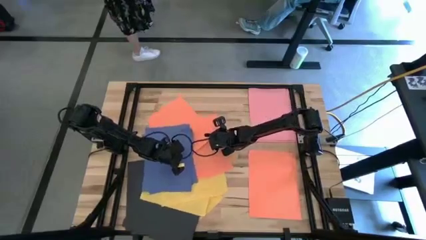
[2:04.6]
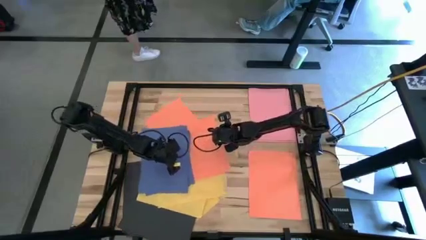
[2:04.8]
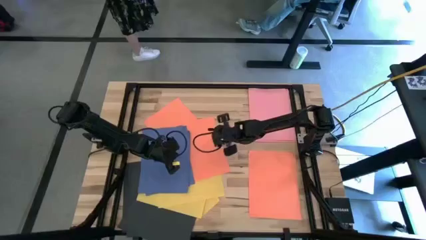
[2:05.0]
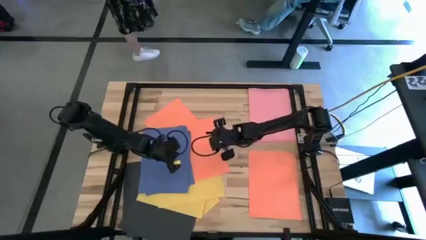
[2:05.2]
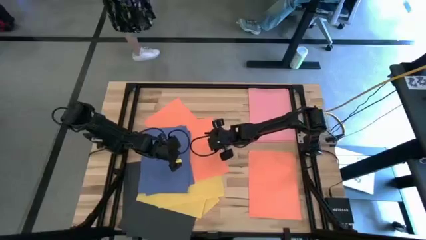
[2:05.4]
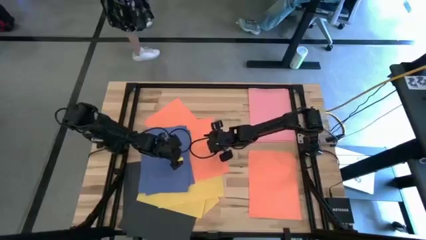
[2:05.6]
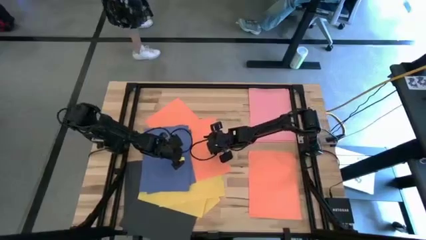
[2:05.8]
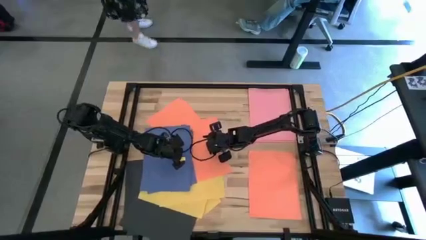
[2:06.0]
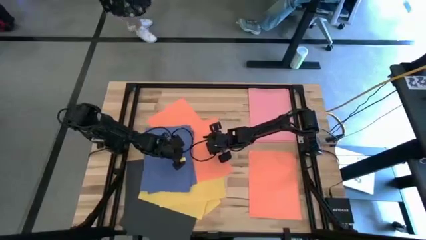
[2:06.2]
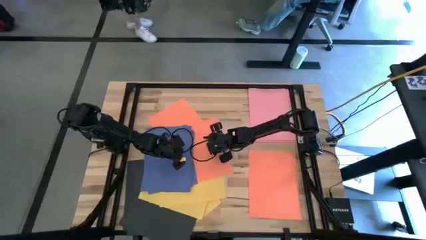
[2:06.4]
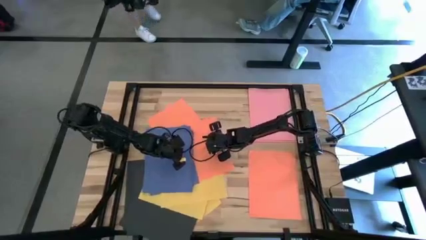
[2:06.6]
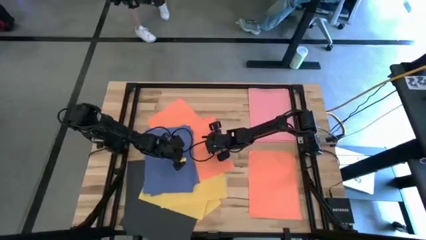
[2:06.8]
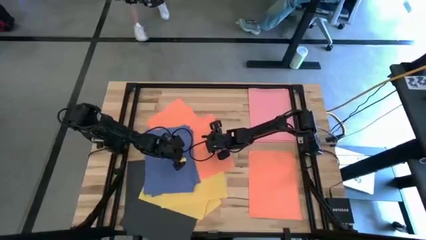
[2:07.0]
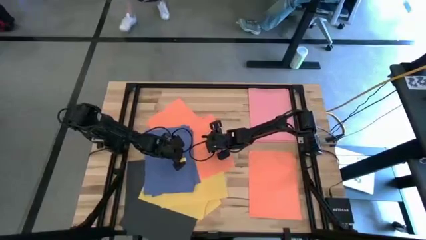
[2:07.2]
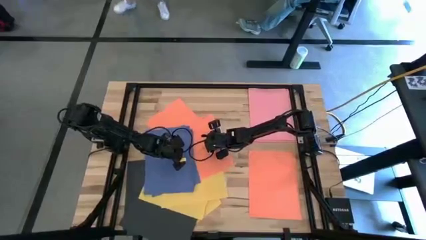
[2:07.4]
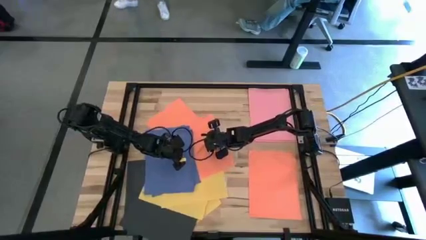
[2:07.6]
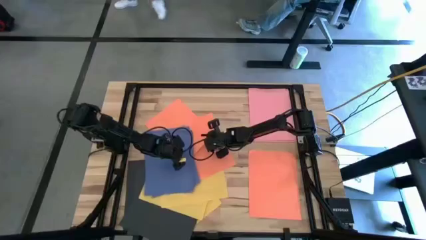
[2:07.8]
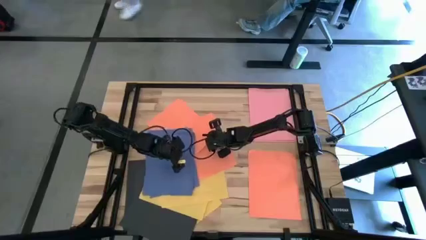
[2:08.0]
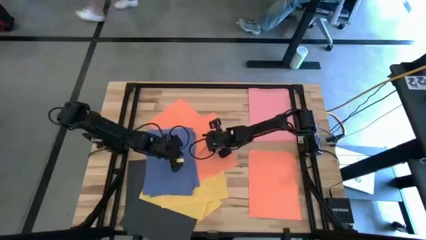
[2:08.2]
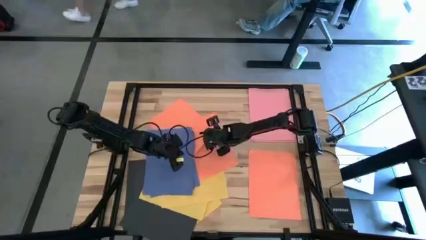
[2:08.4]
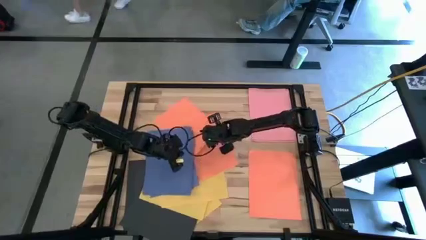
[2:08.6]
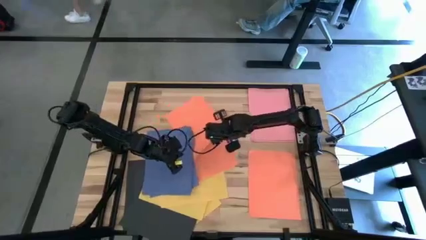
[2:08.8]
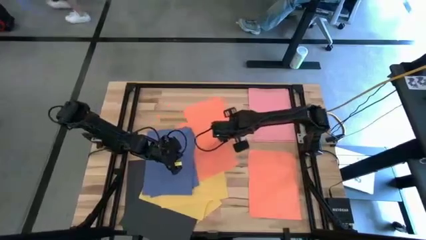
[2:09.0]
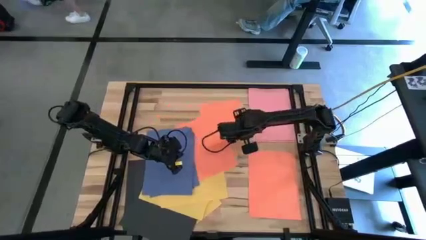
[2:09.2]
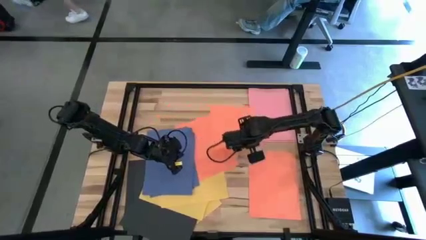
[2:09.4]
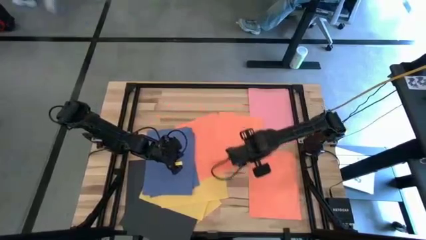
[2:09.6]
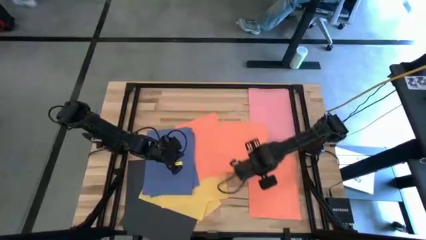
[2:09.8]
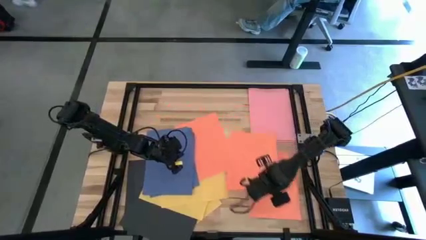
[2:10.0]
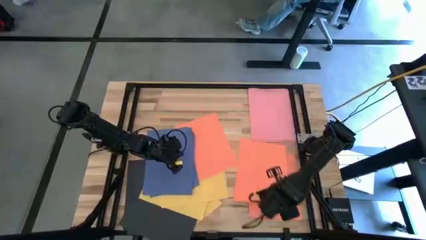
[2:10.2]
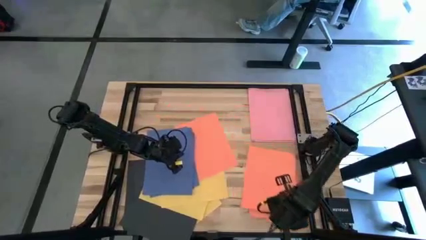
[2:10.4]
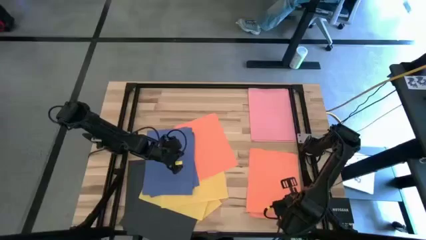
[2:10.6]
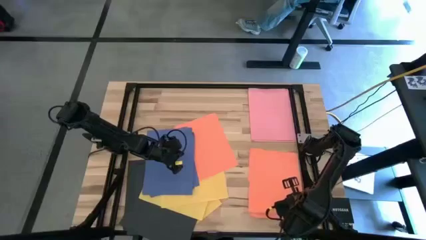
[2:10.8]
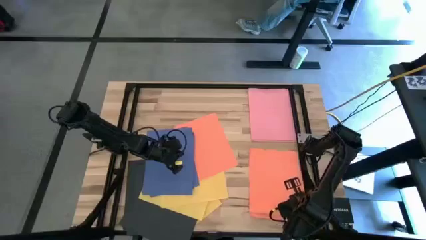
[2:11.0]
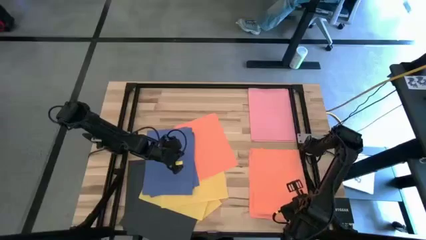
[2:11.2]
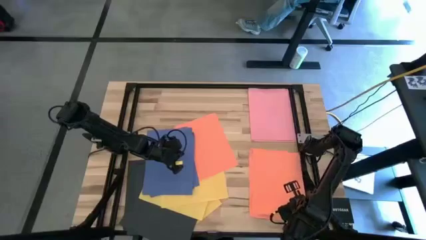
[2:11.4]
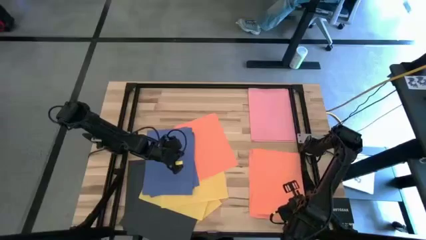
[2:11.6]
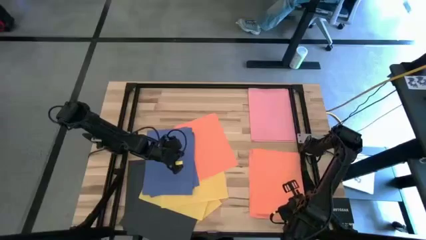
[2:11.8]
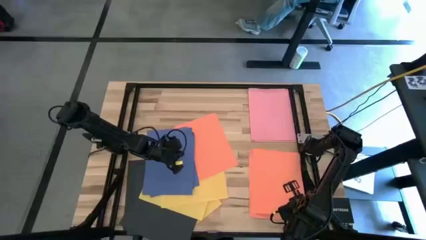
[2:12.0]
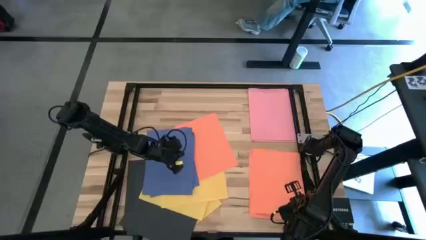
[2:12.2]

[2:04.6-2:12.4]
Task: Organize paper
Stack the orange paper on top of the orange paper

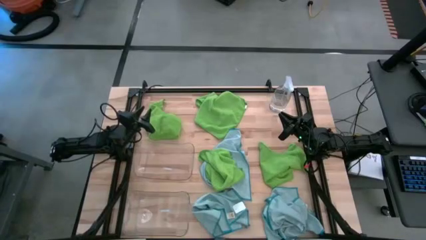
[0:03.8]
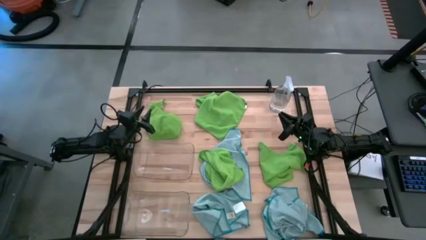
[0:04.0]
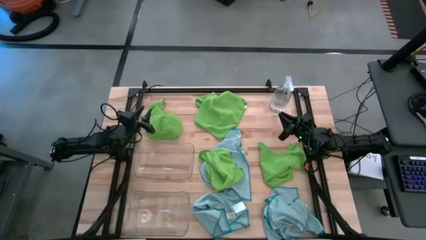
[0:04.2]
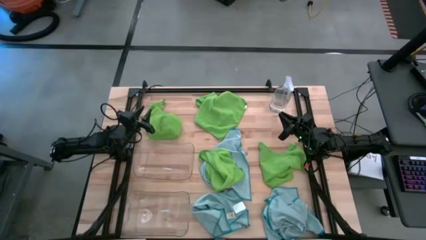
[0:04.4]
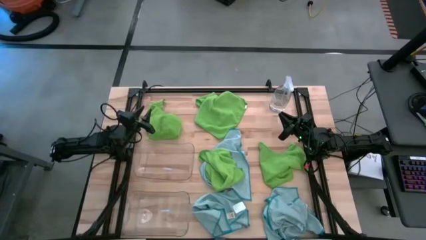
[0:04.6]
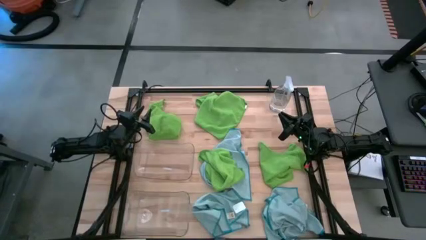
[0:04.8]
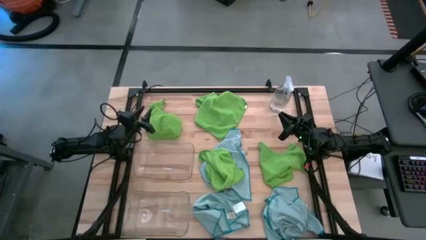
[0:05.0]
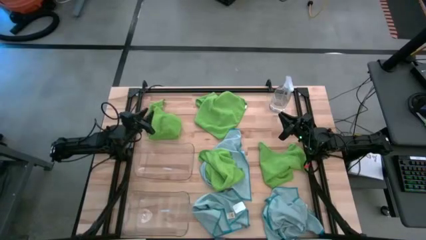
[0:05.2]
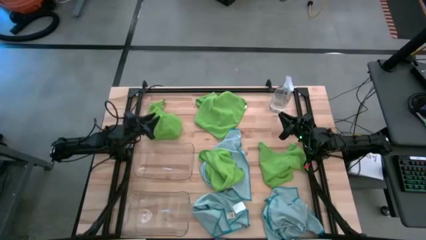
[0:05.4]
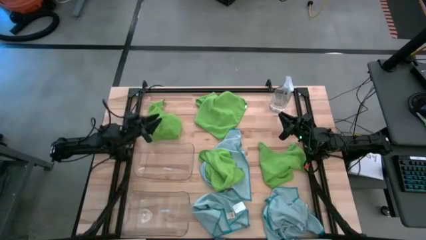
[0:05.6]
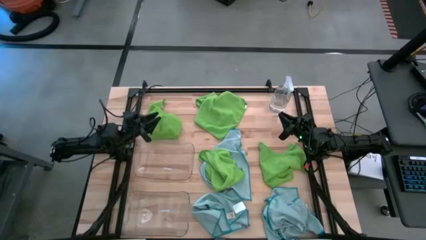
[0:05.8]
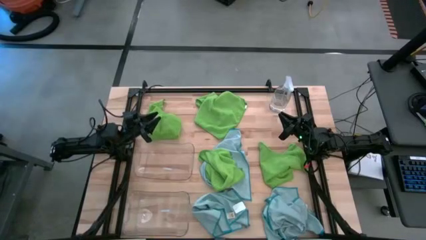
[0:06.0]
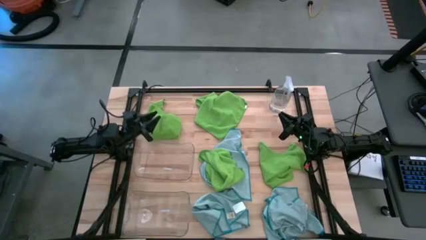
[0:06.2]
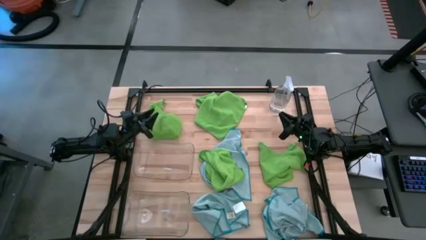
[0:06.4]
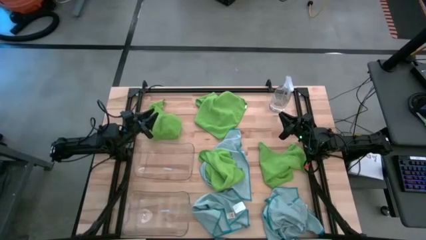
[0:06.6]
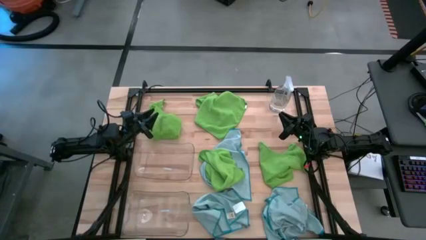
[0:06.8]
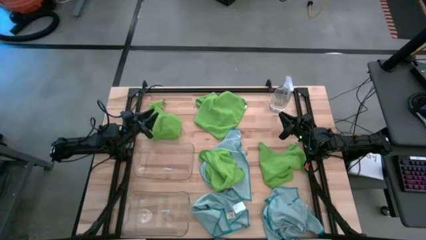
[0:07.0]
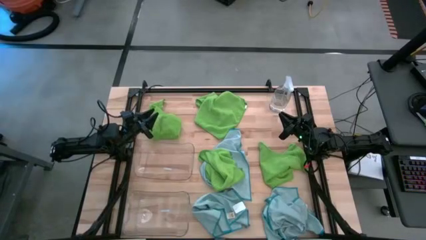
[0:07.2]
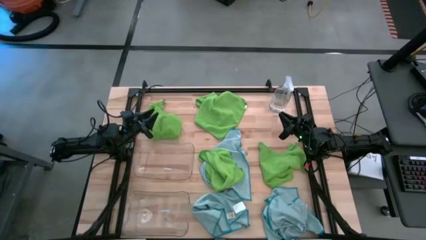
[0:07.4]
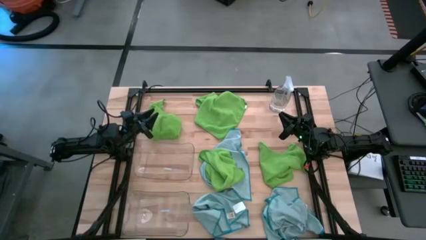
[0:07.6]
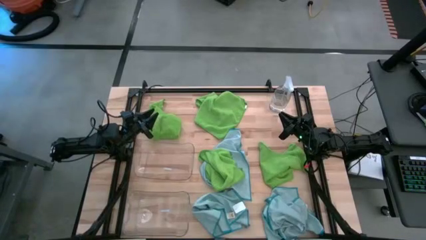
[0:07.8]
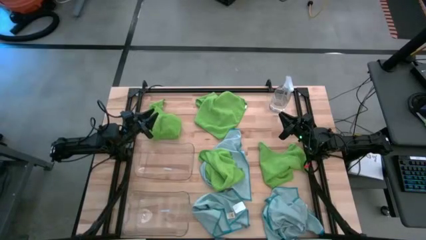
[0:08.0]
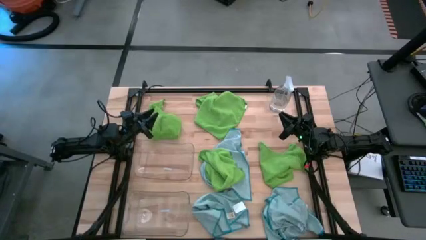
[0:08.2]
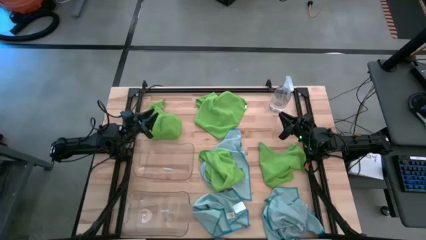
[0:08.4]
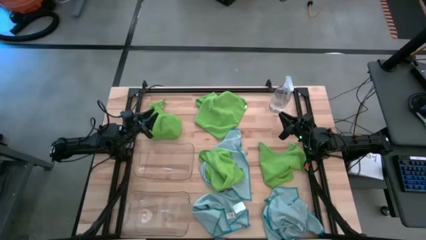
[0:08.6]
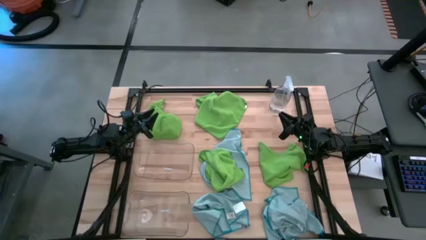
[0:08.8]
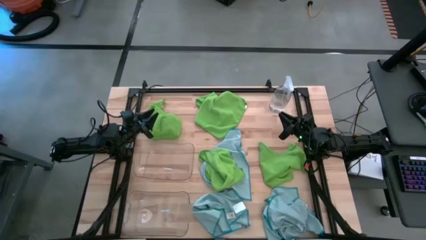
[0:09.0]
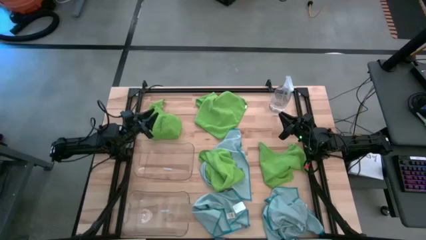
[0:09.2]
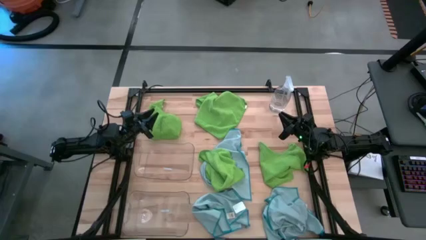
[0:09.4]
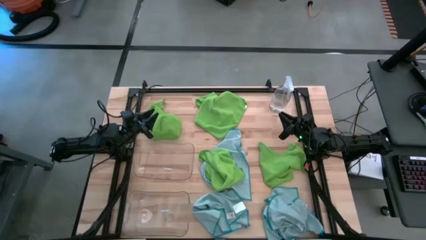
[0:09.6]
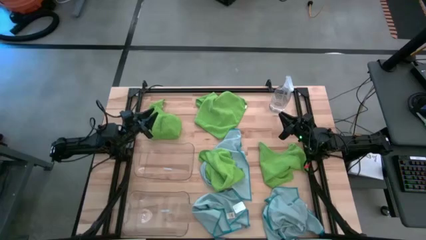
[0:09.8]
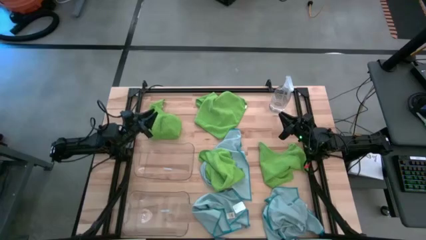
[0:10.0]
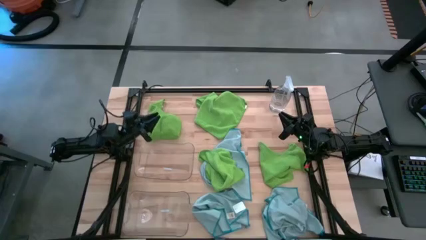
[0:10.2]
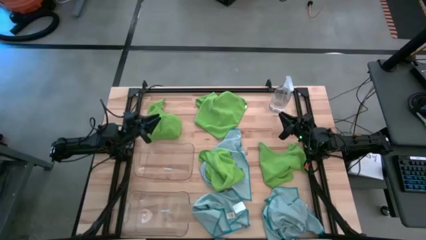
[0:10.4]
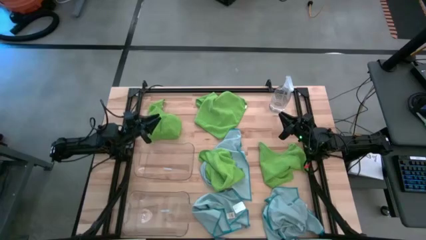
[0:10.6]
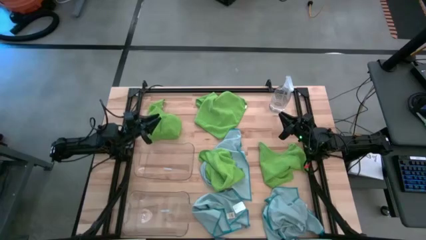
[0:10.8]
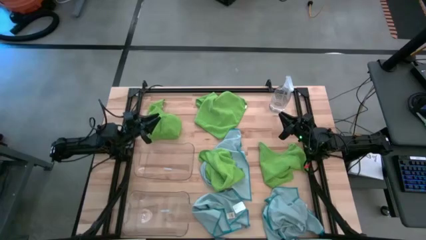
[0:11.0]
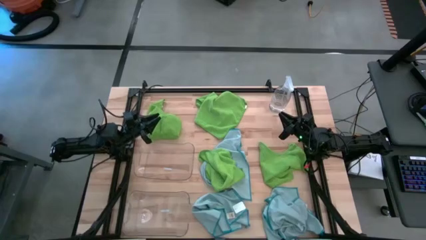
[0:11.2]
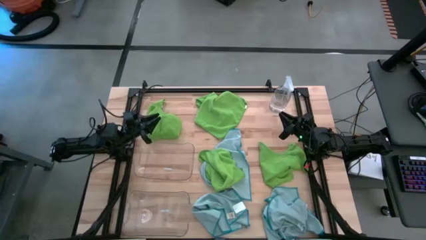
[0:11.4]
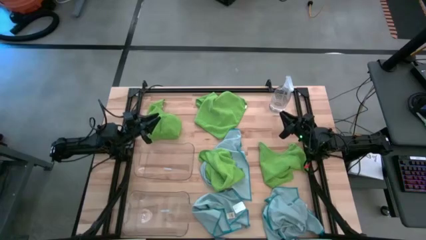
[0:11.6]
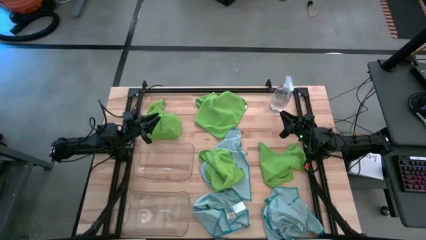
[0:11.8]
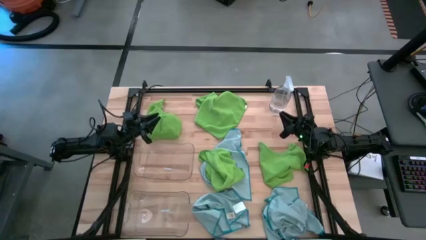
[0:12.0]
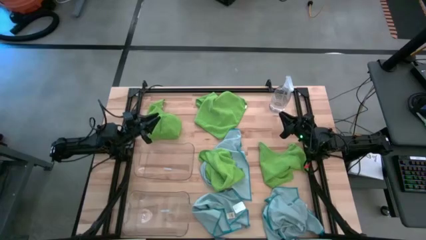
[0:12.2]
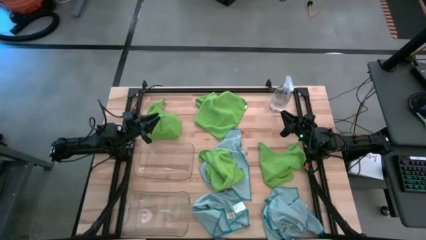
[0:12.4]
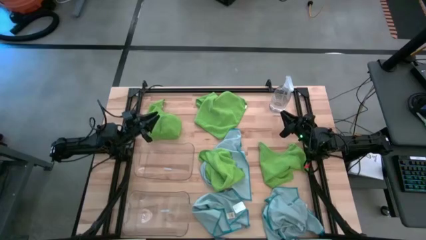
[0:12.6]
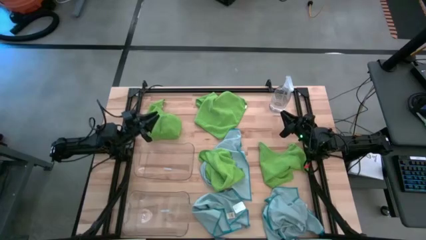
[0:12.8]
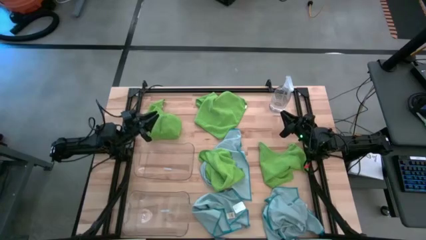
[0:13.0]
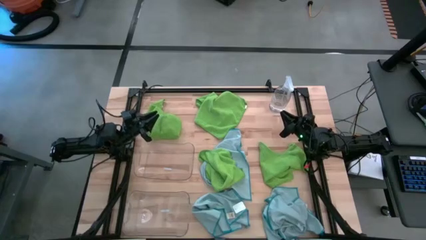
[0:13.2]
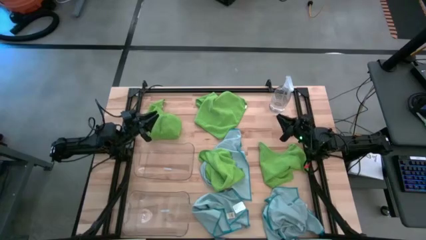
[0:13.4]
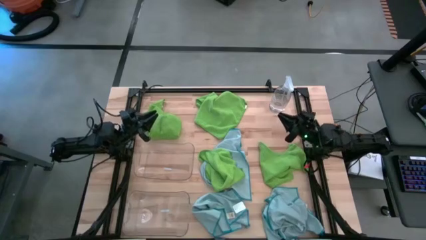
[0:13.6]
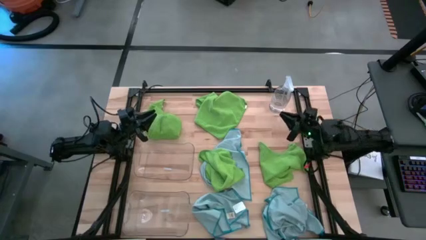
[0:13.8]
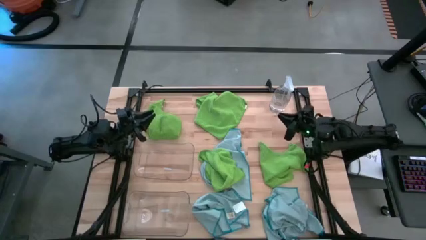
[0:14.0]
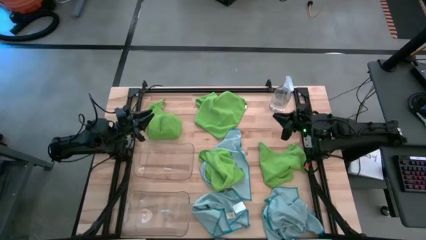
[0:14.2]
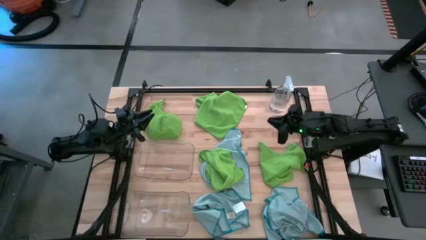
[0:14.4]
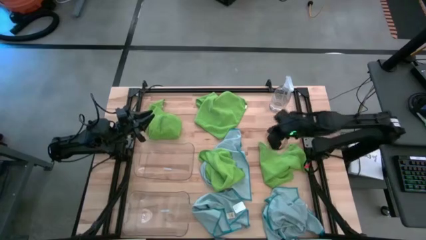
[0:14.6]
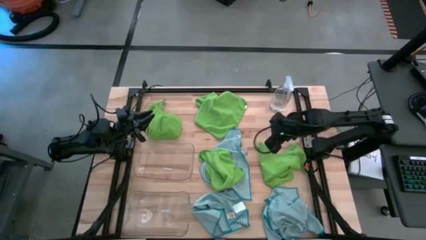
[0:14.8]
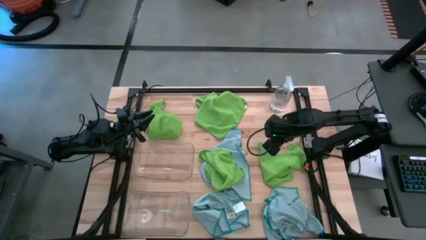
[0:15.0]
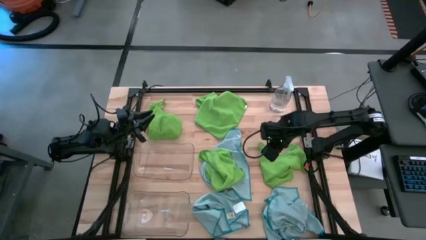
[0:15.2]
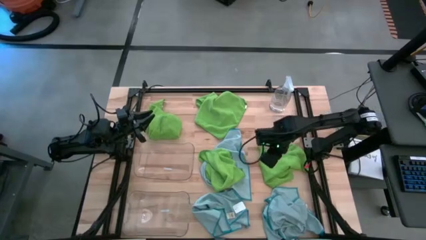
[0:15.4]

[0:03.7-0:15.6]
Task: Sort microfiber towel by color & place in baskets
Put the bottom right green microfiber cloth into the top transparent bin
